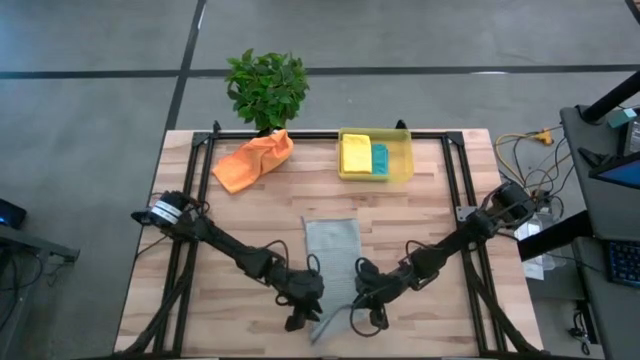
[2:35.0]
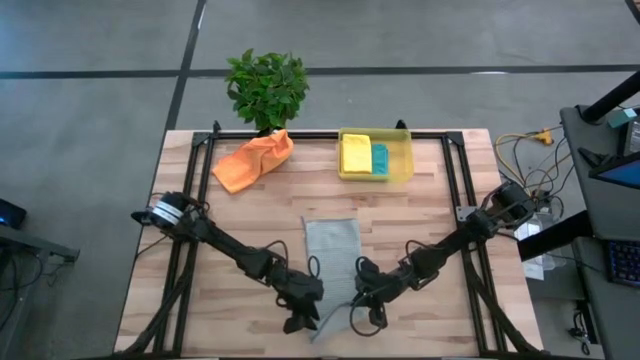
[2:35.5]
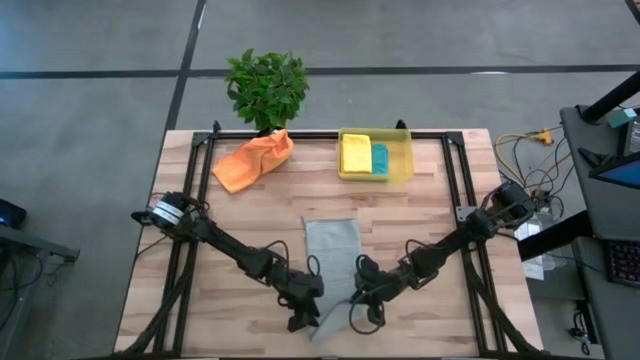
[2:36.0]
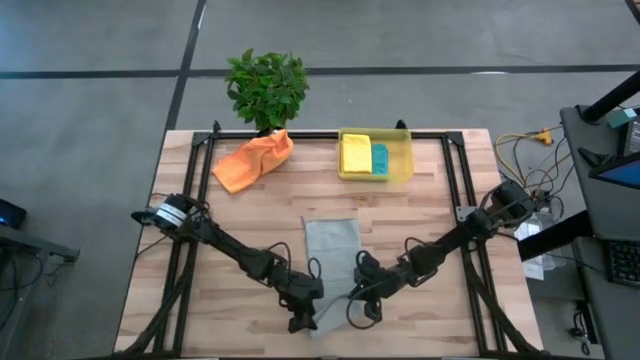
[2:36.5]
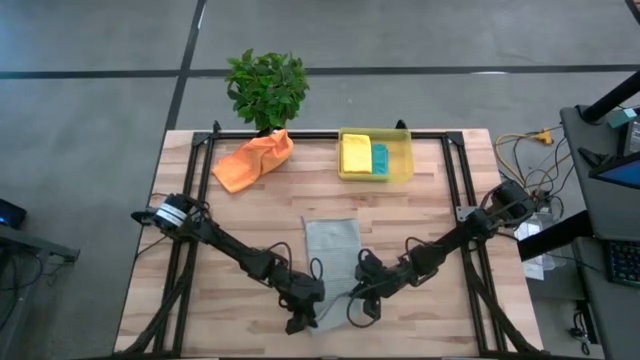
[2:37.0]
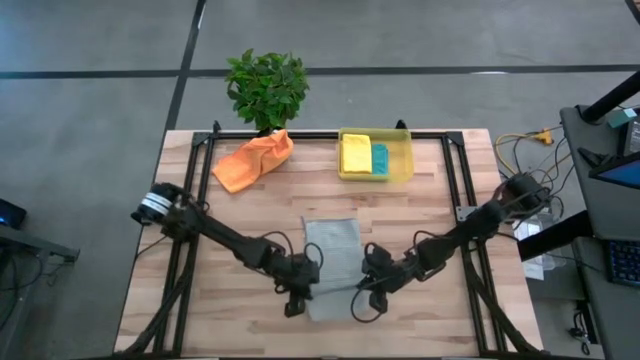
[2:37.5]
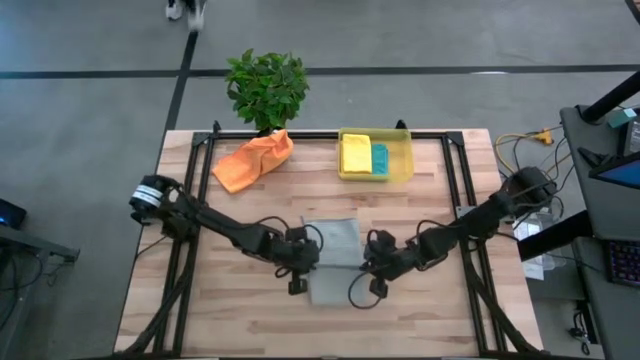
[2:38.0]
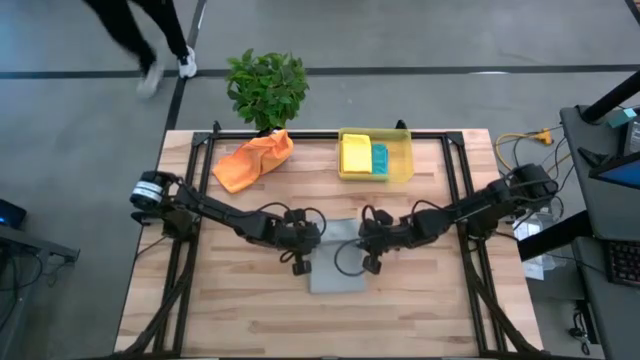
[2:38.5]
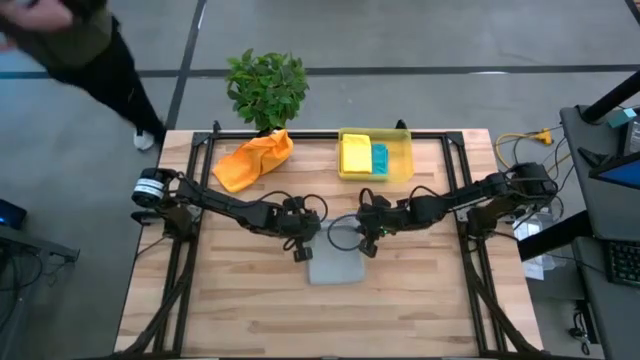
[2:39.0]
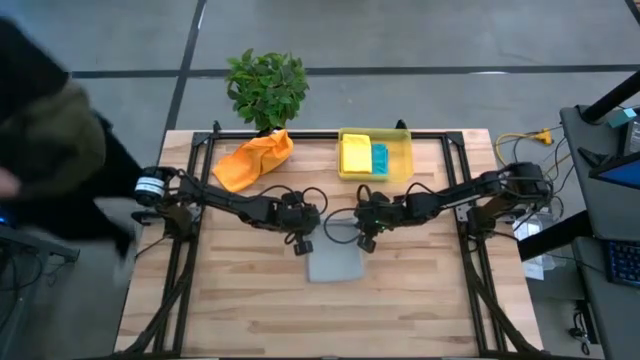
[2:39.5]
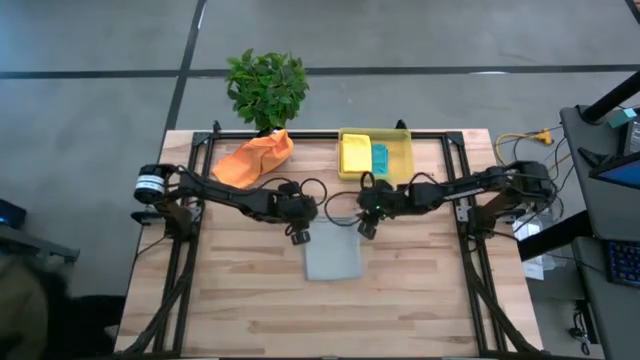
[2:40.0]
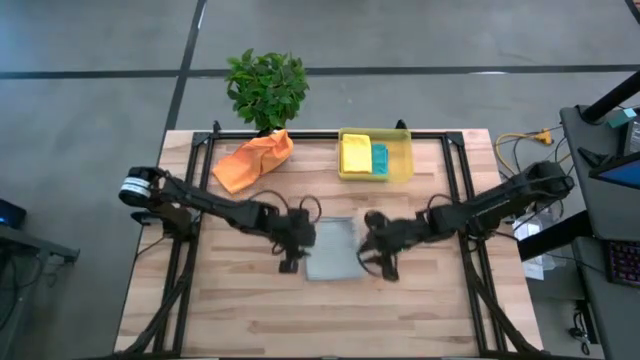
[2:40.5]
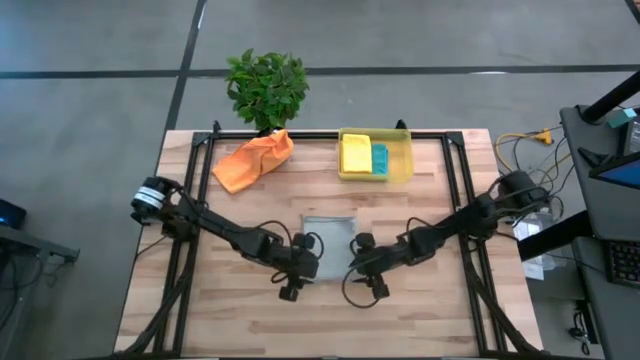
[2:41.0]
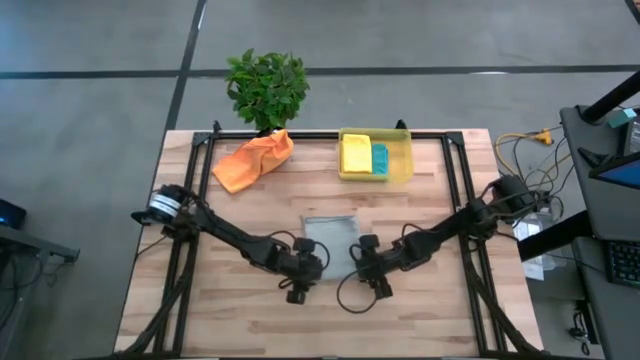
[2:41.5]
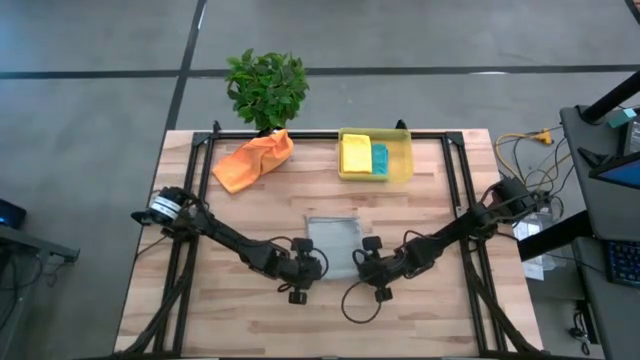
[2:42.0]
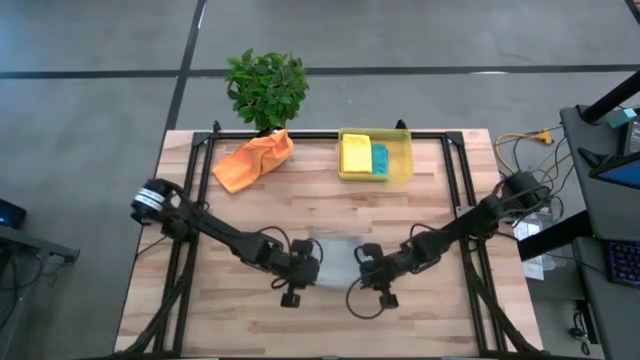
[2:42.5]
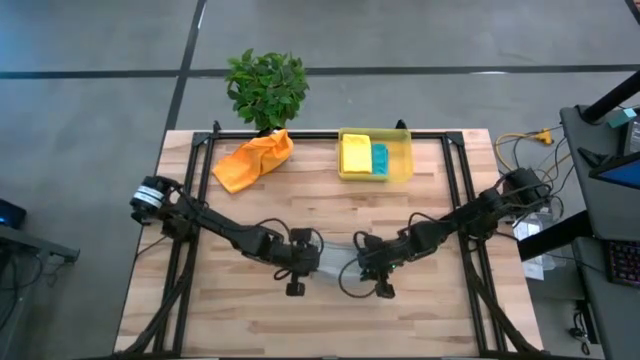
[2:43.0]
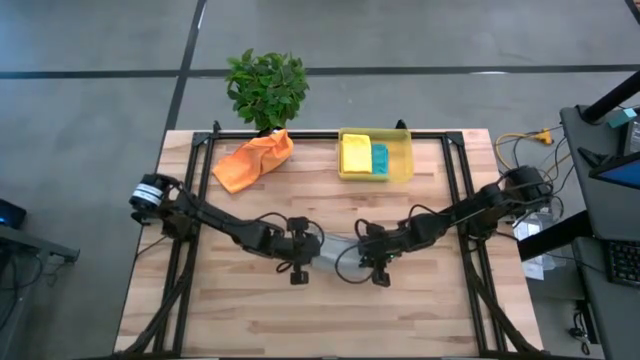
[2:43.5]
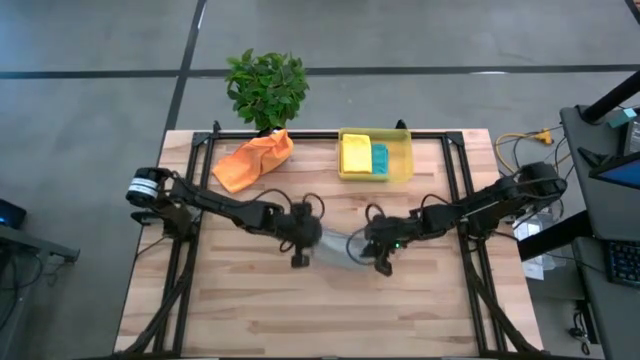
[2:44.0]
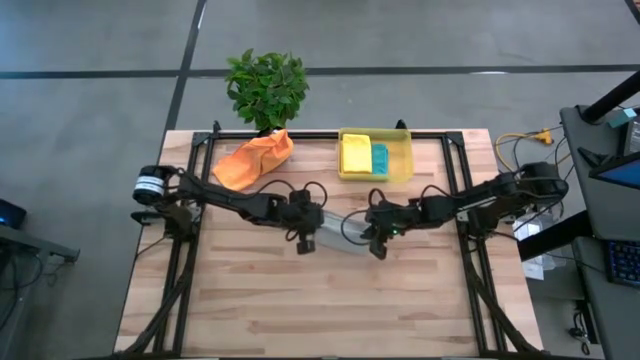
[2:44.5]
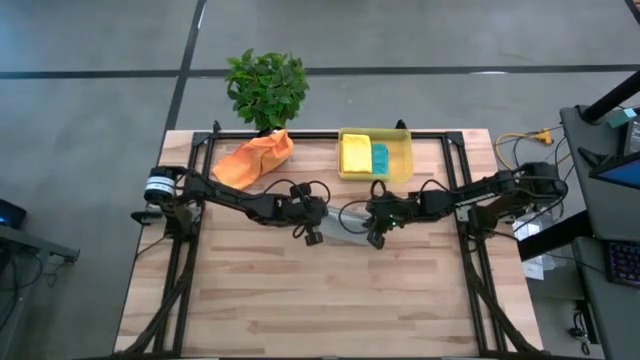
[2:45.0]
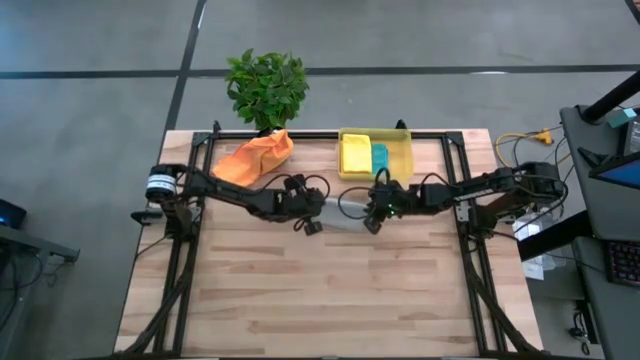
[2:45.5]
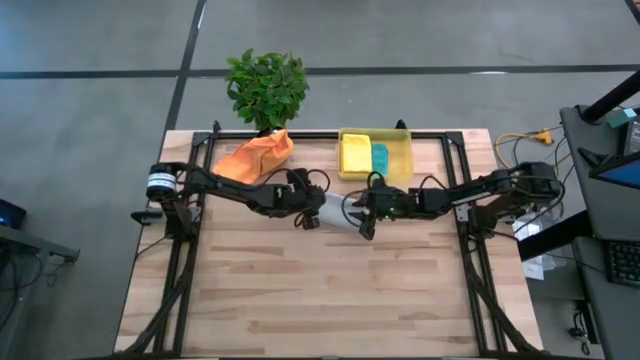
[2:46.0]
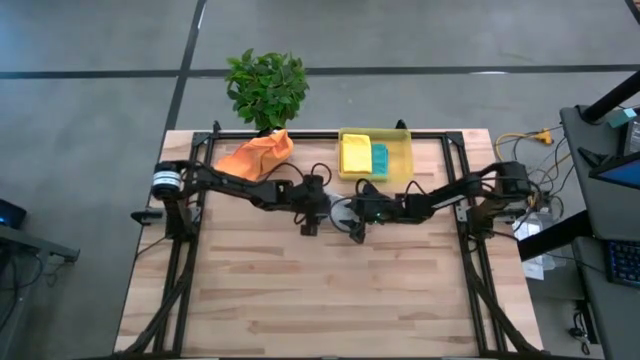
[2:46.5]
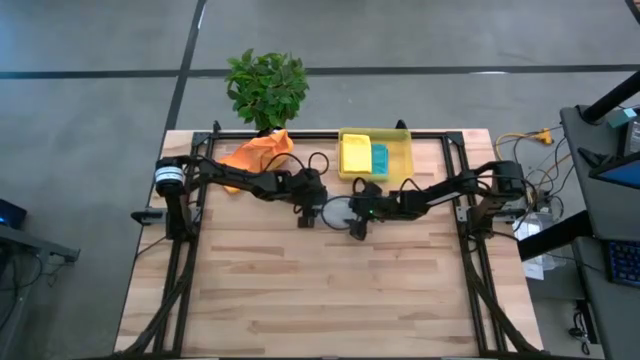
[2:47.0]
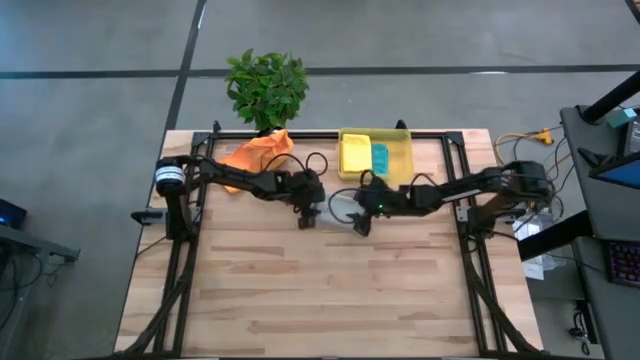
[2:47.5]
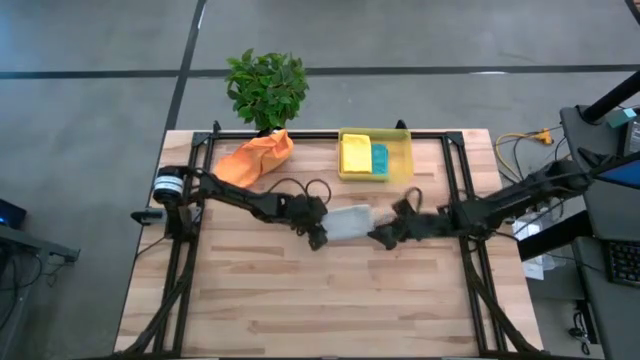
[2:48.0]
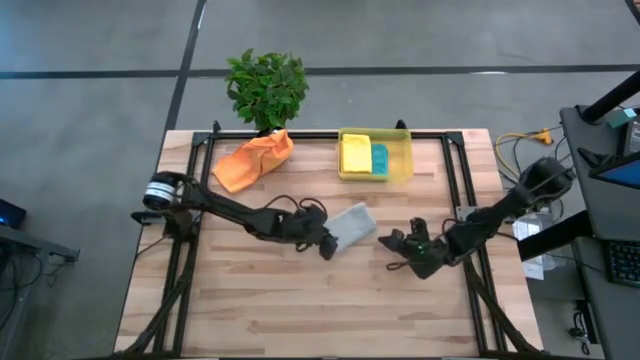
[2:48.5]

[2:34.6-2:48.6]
Task: Fold microfiber towels
Fold the gray microfiber towel

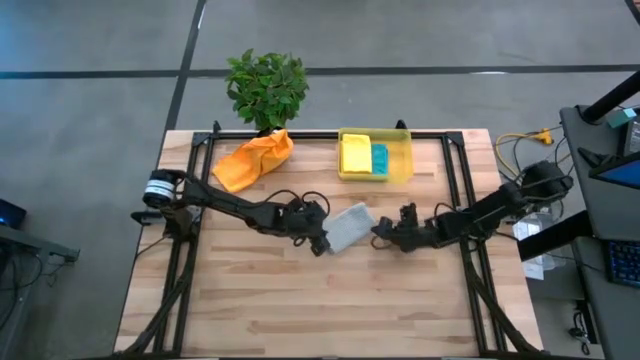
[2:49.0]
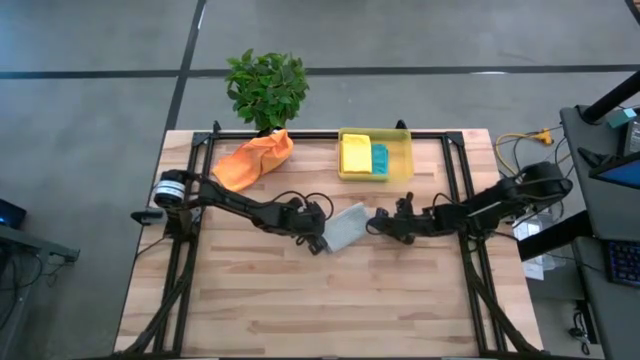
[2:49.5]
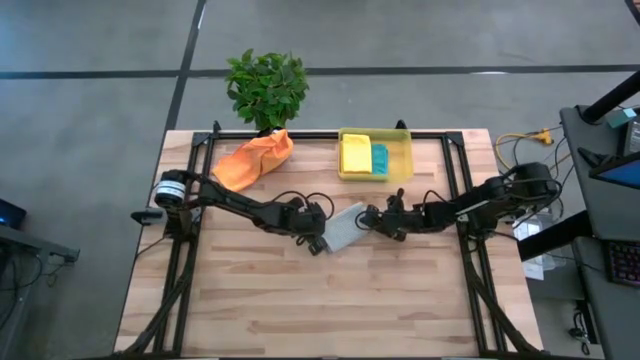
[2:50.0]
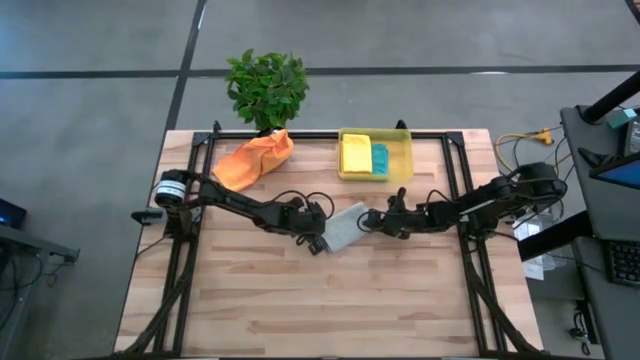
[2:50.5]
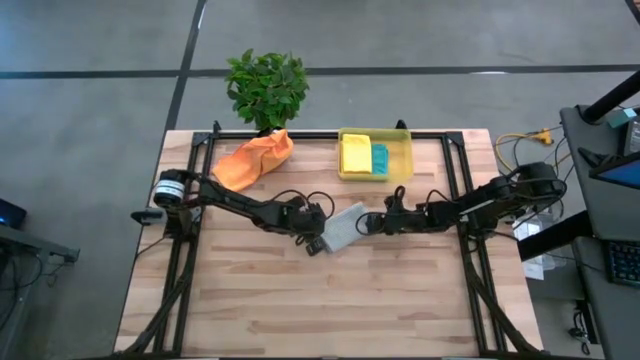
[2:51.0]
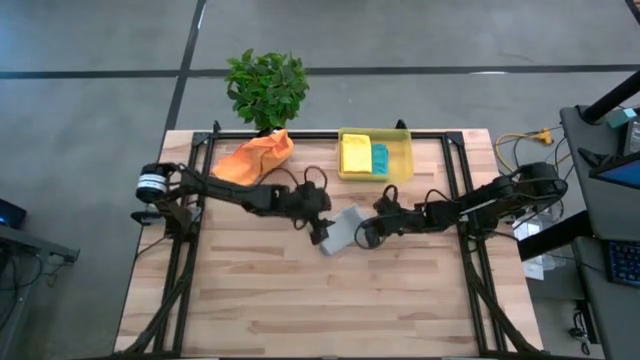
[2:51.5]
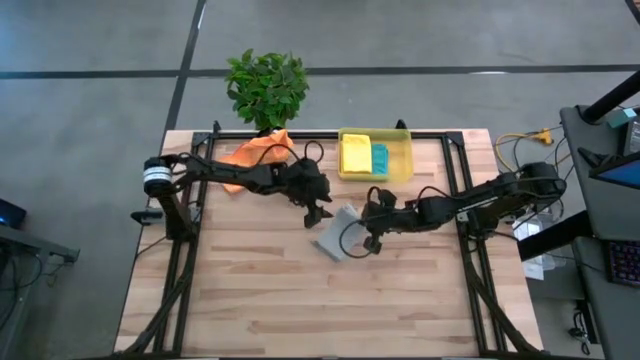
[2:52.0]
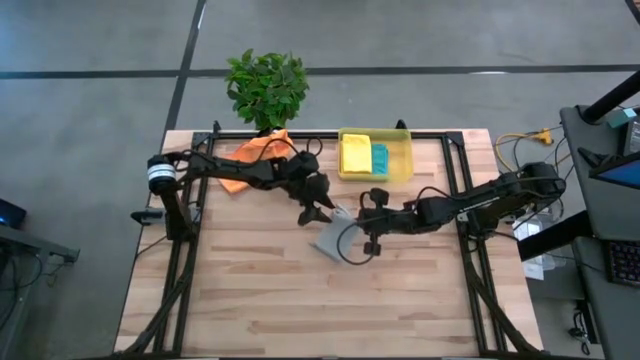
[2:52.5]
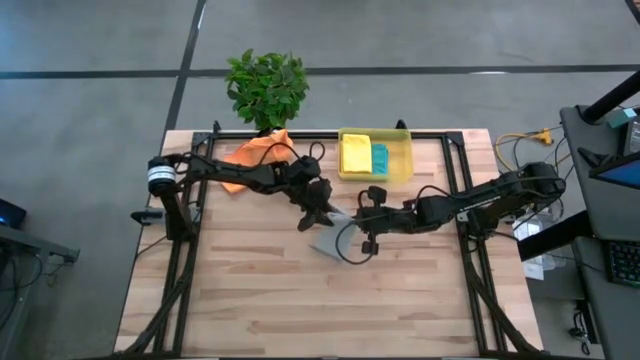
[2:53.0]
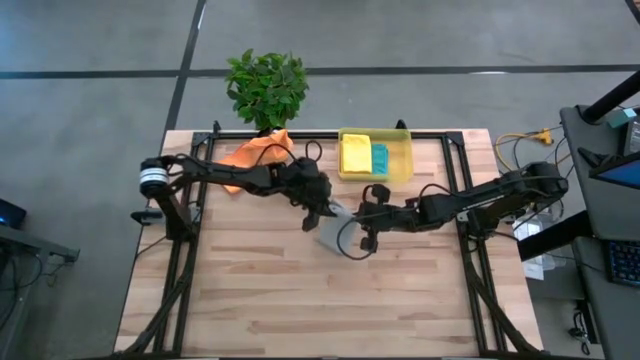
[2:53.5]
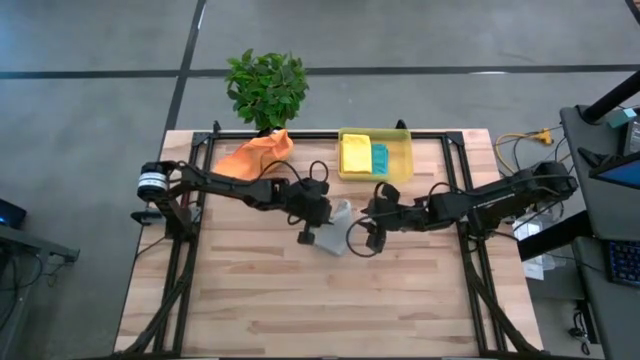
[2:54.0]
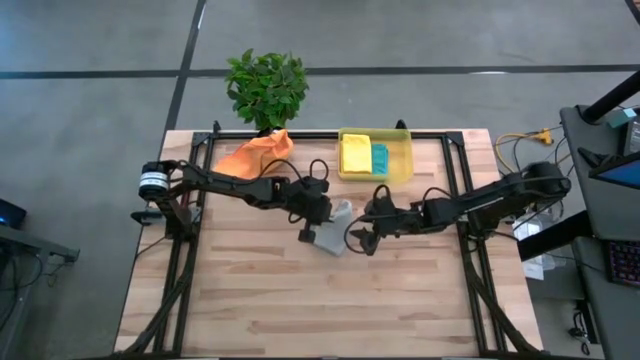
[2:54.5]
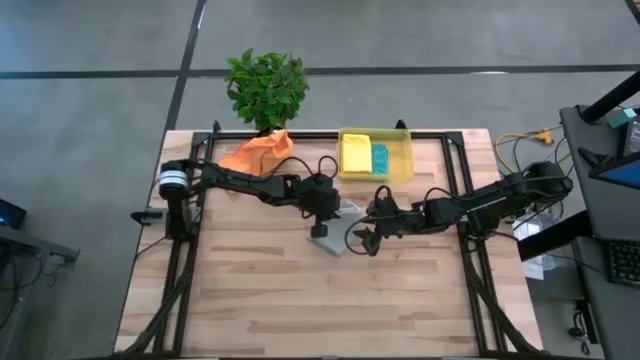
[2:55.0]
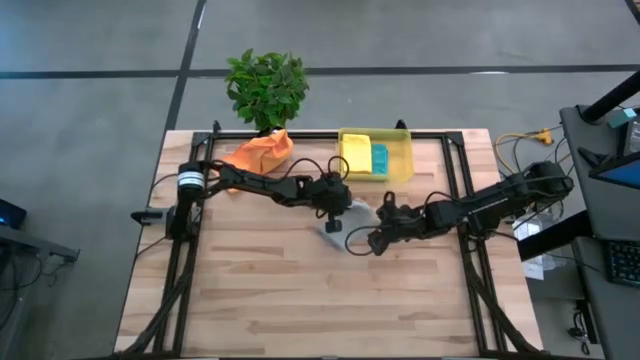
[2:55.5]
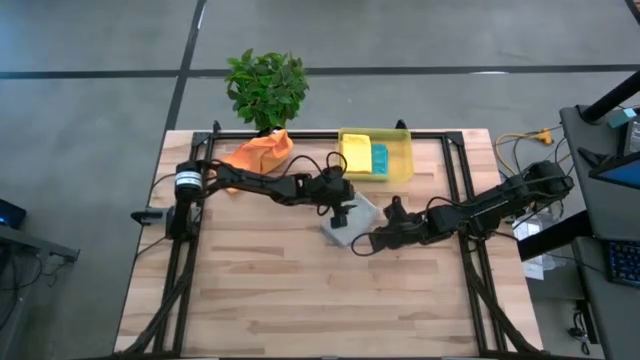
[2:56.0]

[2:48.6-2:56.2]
Put the folded gray microfiber towel into the yellow bin
